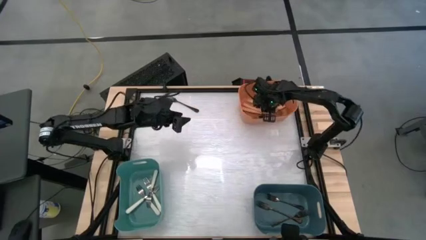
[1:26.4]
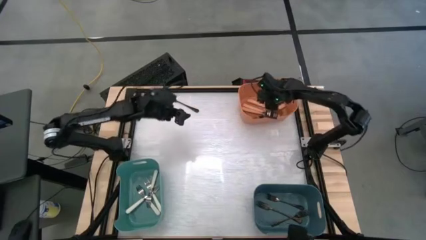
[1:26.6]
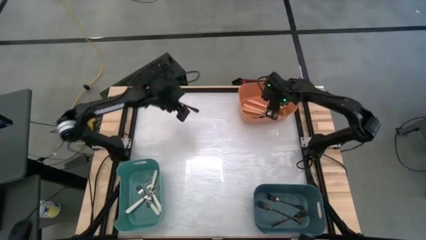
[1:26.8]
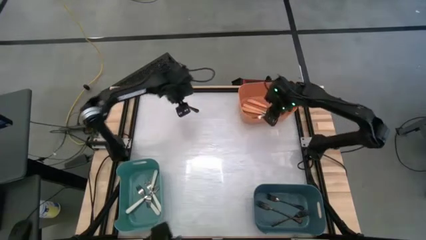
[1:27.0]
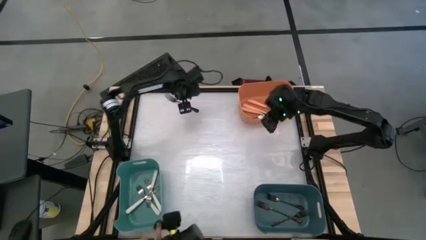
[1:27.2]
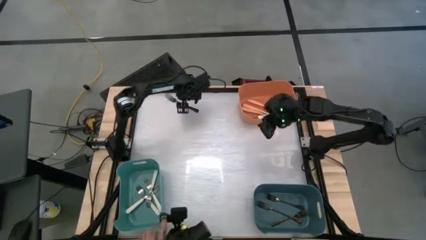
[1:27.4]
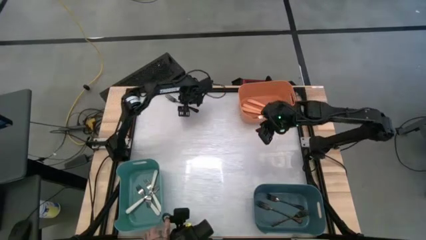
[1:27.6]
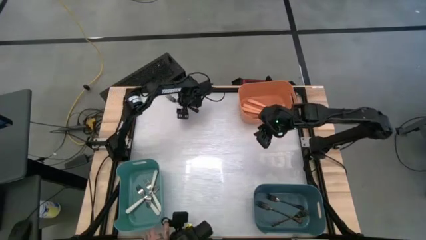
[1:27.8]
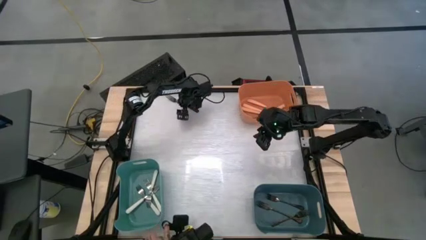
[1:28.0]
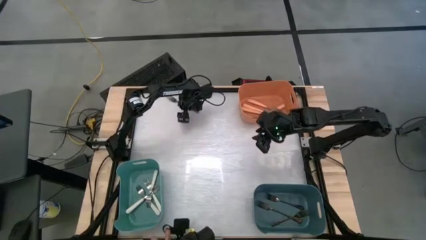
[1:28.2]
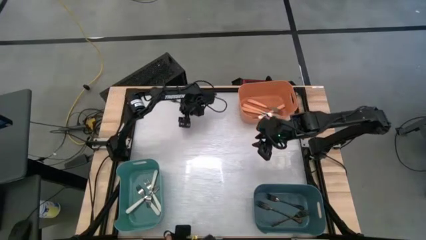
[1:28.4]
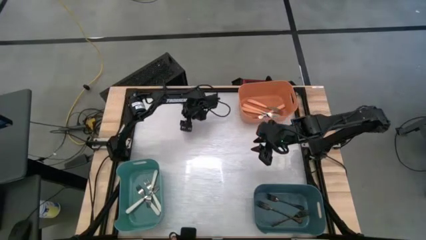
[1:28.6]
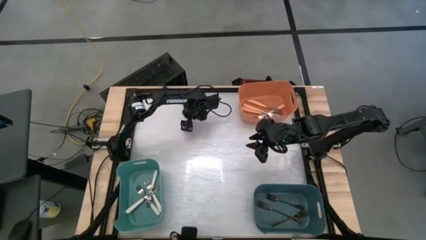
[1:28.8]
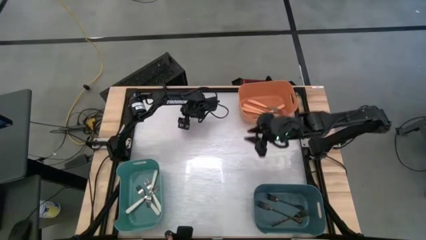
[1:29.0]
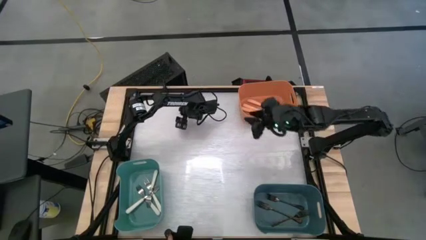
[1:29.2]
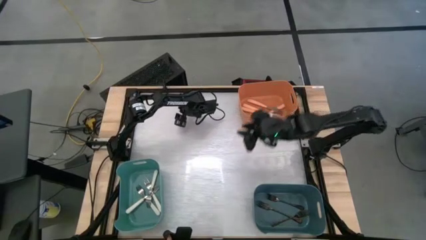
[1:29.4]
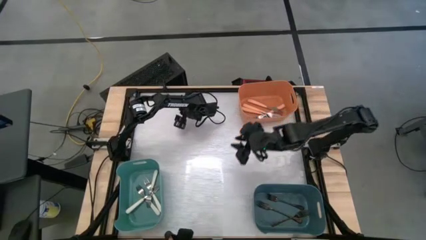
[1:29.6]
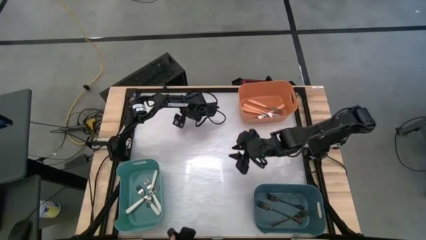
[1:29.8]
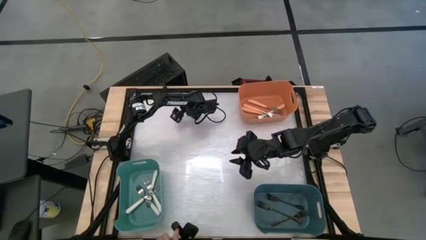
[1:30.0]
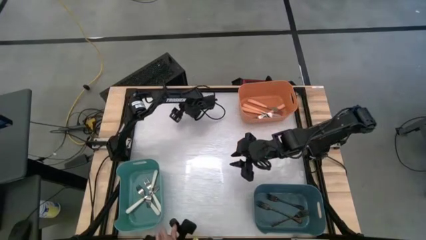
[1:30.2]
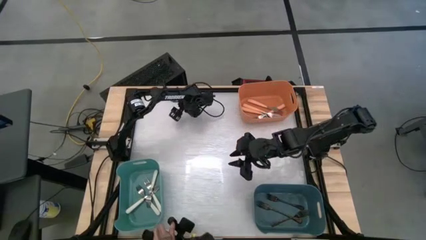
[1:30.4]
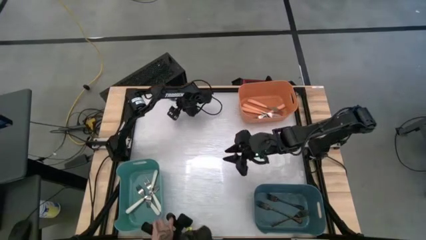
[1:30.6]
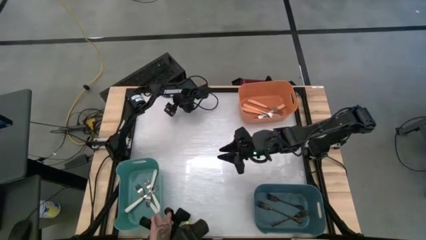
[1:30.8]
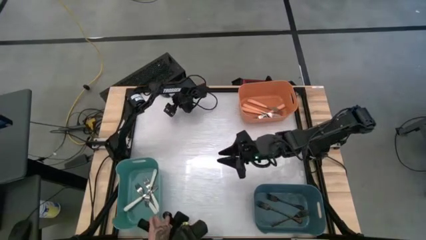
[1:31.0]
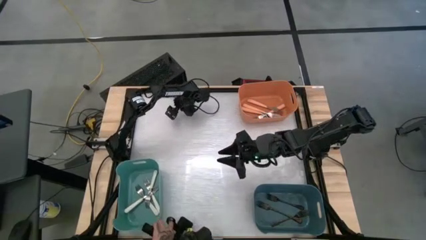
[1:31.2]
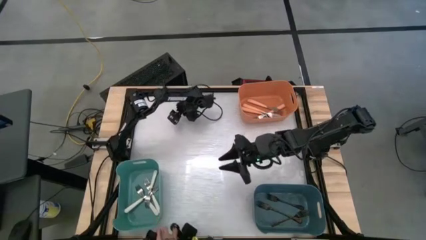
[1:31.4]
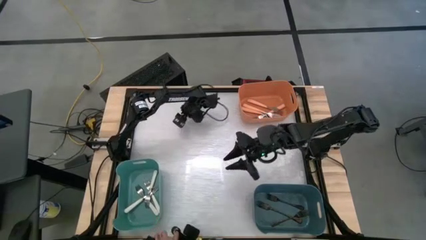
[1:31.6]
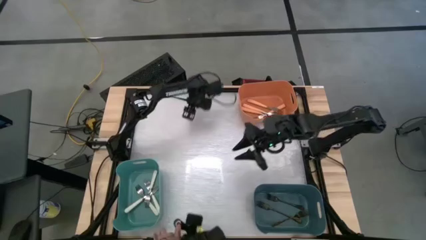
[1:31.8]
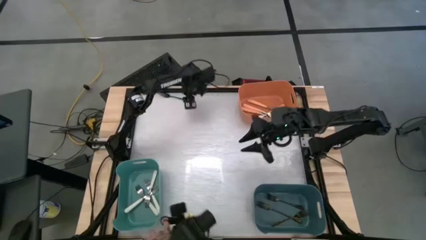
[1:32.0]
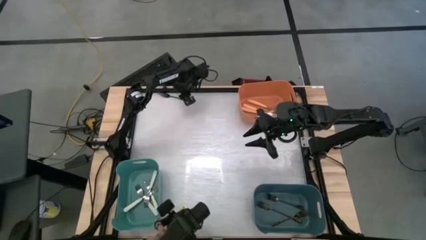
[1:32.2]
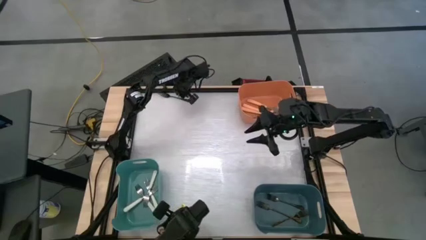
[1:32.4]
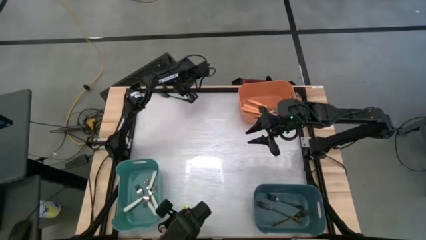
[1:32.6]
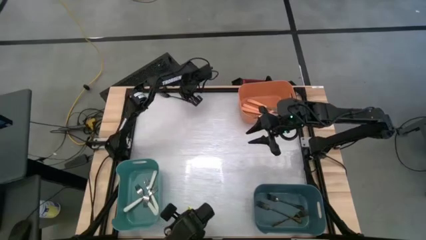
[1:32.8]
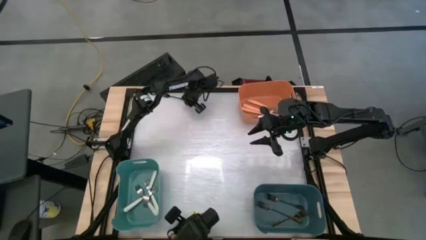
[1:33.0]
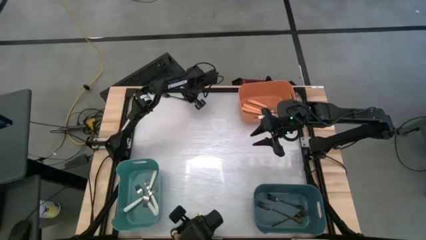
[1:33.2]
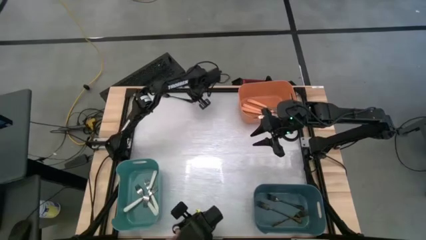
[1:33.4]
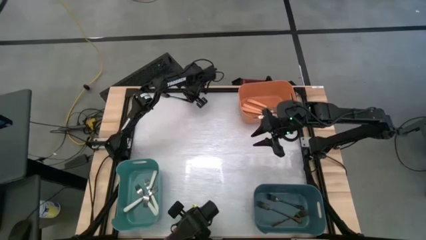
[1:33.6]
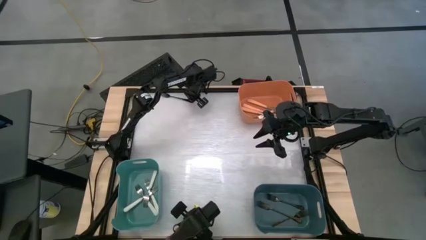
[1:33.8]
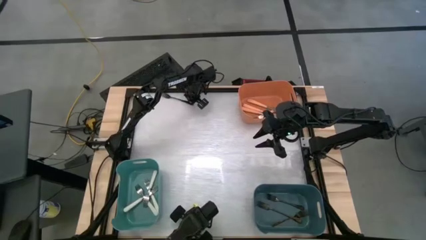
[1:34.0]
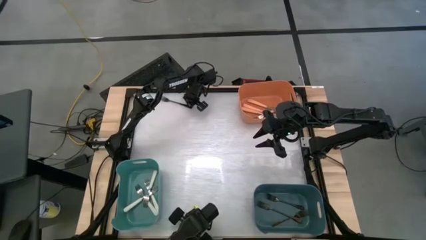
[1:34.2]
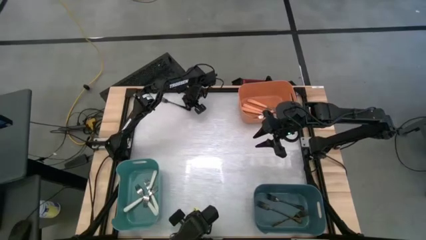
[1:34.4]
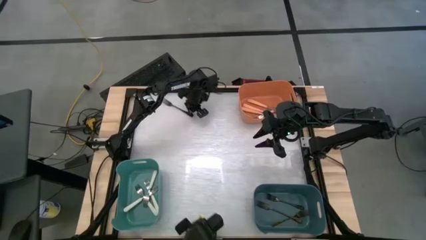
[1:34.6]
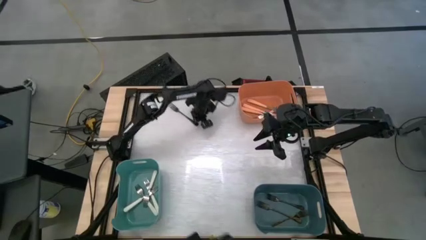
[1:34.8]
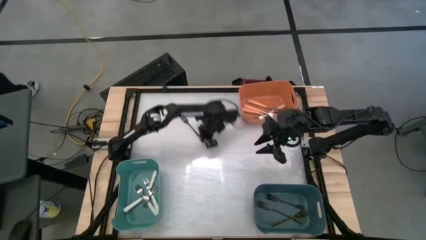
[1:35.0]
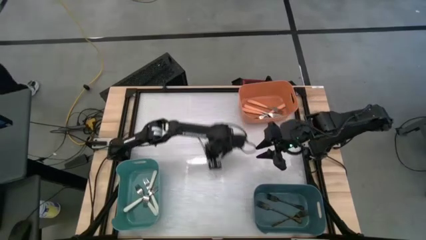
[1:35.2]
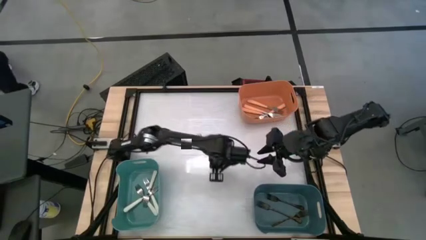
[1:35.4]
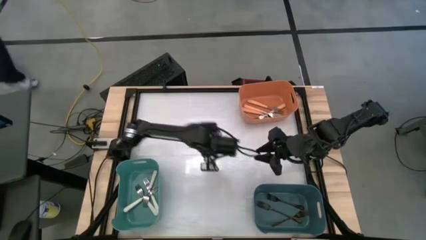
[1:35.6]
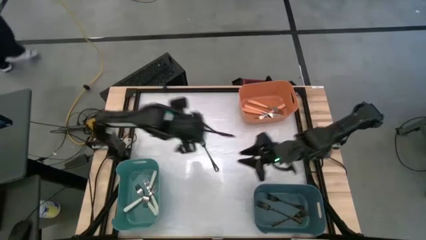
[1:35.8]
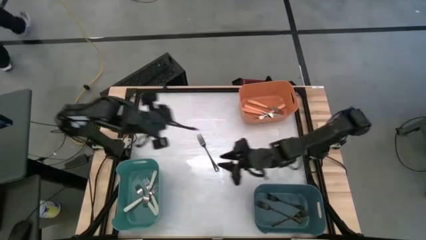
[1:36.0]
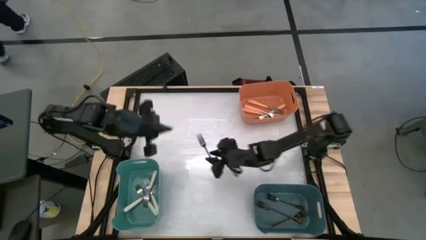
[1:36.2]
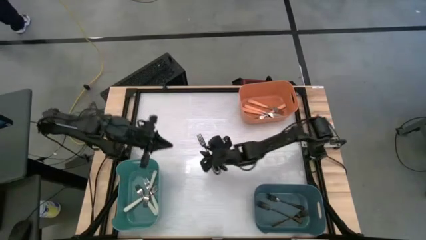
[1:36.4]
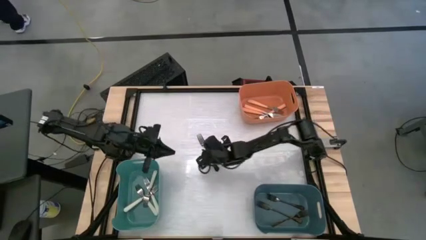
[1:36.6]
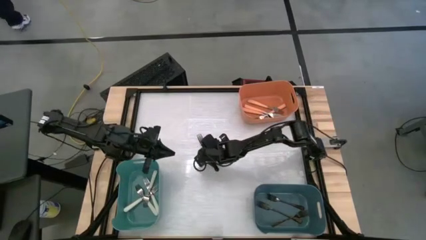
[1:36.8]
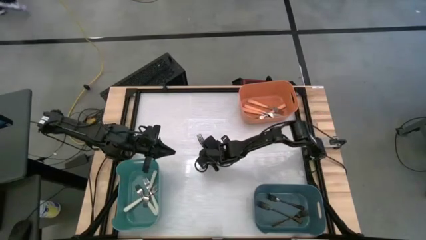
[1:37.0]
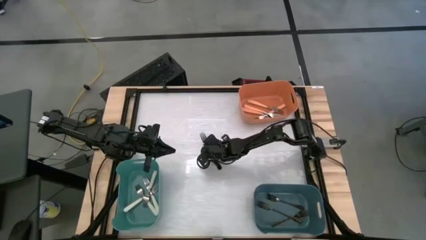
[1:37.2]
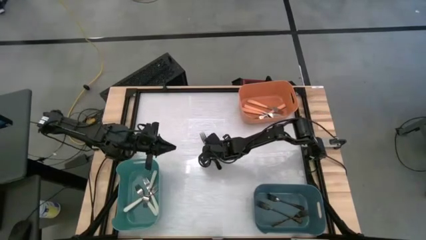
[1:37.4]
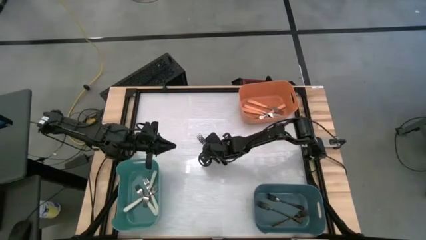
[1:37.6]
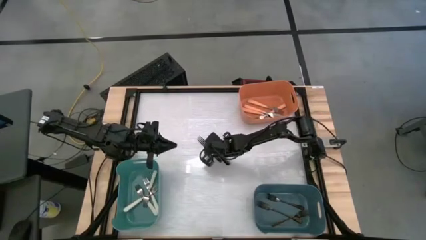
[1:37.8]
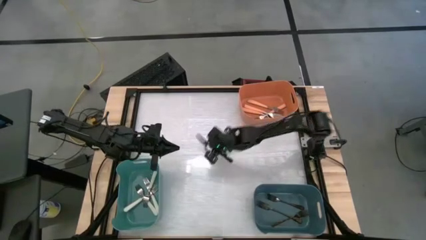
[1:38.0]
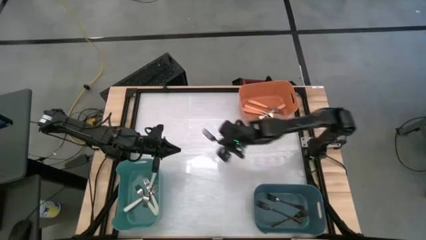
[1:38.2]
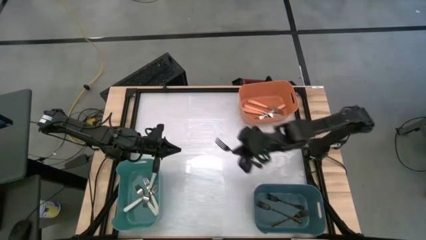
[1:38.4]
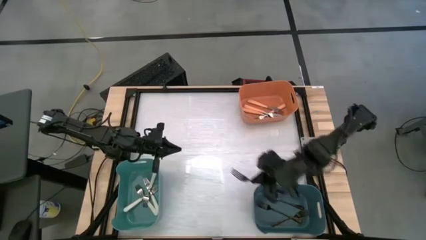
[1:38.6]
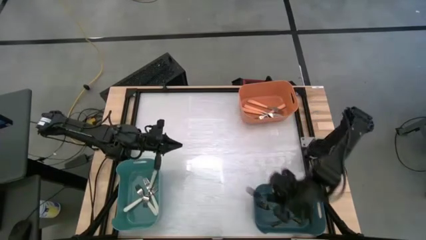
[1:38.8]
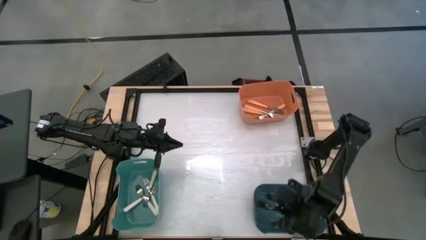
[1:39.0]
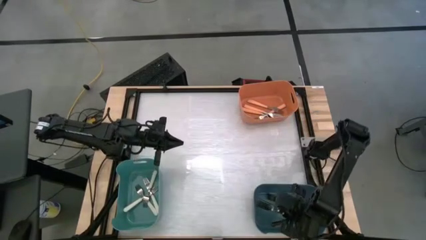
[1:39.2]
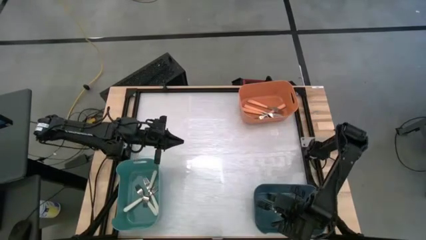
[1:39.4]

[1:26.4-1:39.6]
Task: Sort silverware by color (type)
Put the black fork into the blue bin

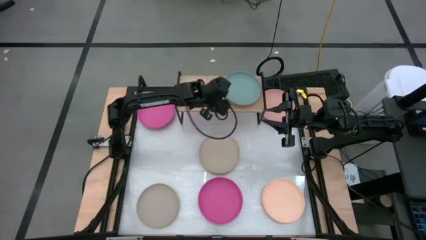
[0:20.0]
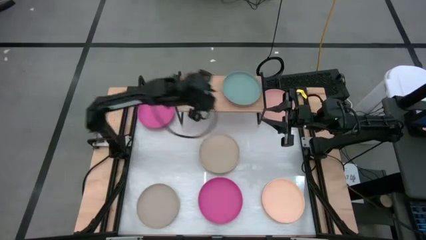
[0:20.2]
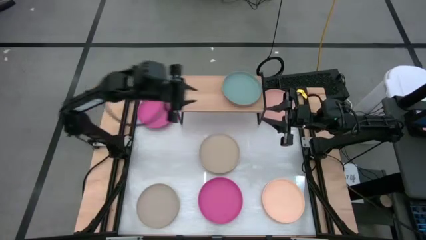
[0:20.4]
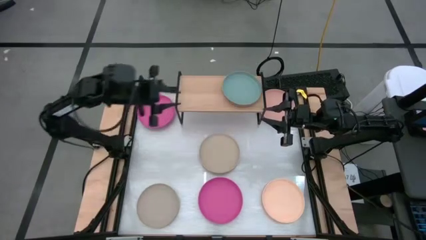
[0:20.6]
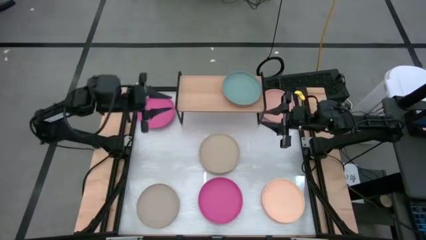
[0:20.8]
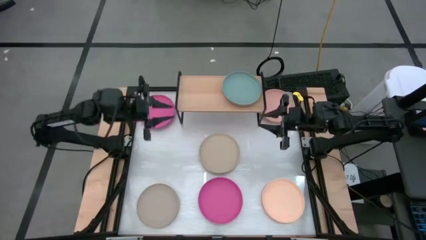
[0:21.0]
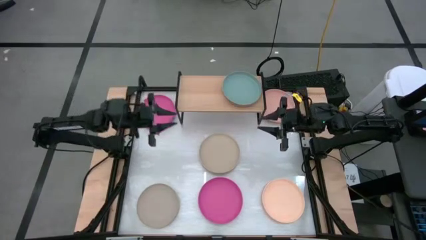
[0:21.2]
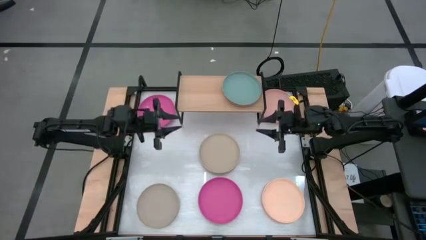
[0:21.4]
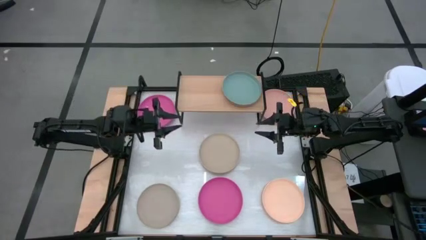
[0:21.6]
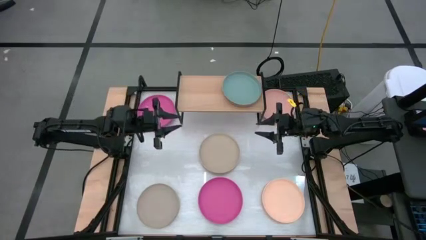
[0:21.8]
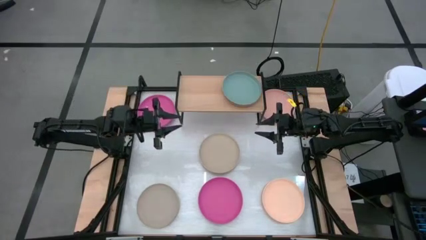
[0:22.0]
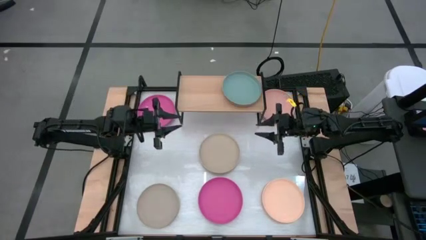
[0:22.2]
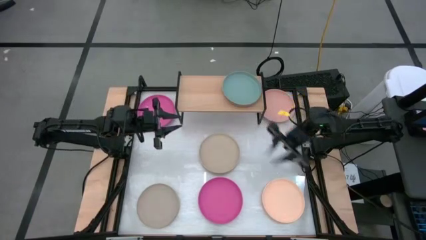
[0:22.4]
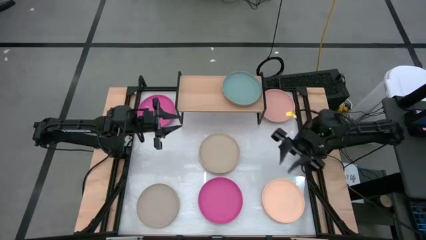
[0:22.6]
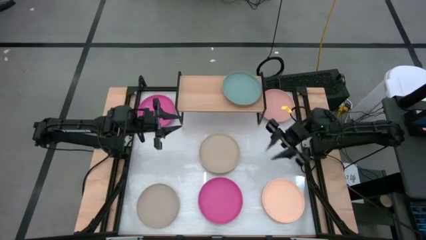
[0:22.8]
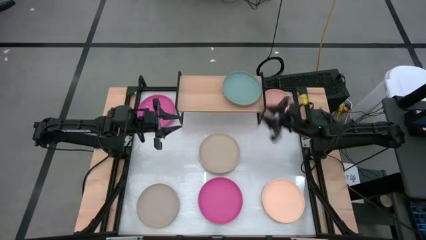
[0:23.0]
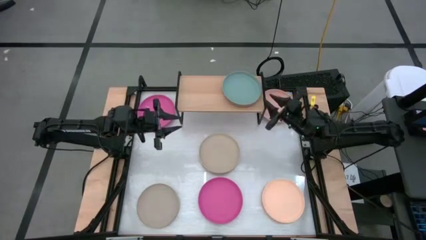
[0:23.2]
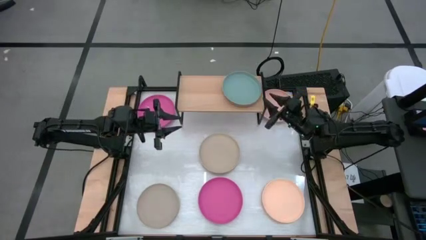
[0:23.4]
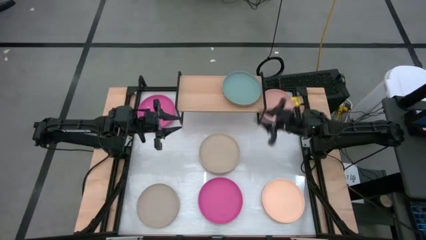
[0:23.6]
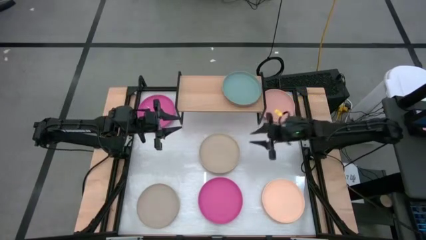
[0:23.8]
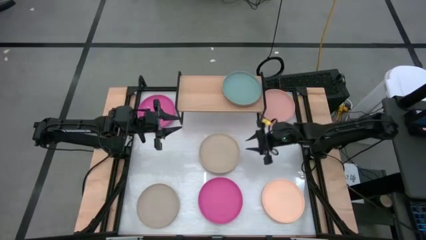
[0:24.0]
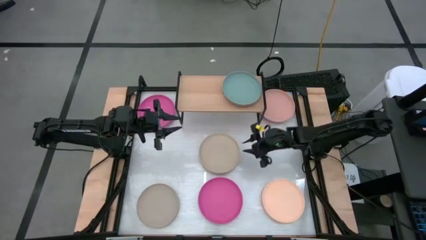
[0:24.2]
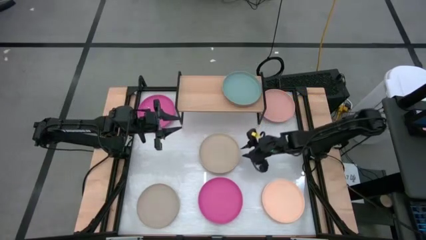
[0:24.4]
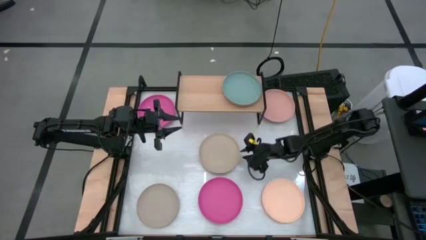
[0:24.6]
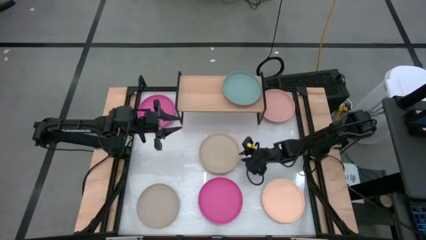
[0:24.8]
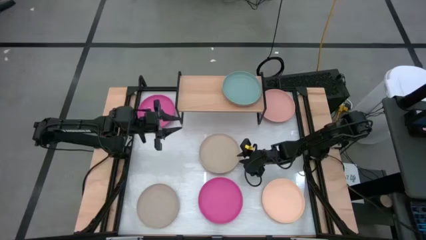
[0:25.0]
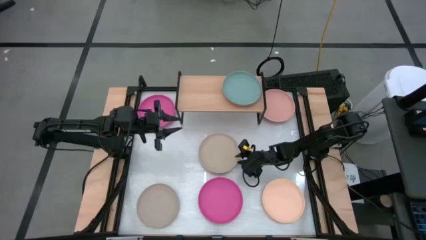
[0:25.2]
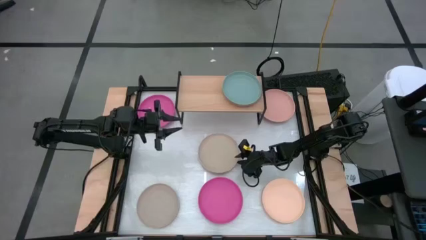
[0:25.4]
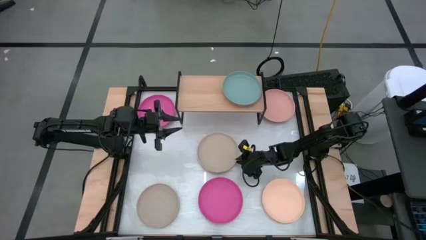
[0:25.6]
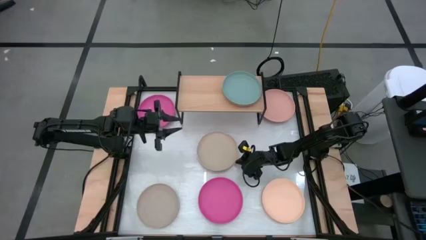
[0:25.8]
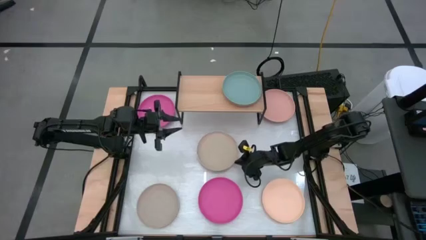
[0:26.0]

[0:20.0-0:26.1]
Task: Place and stack plates onto a shelf
Stack the top light brown plate on top of the green plate on the shelf
